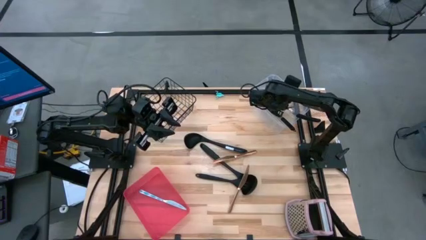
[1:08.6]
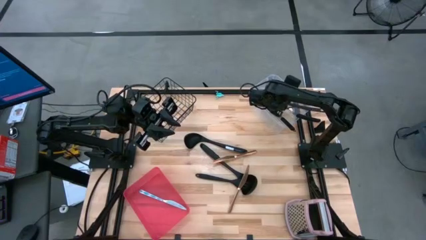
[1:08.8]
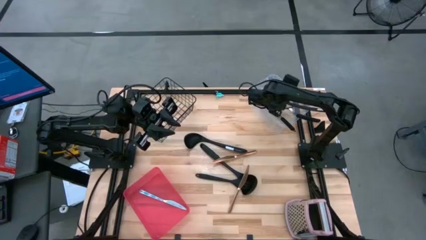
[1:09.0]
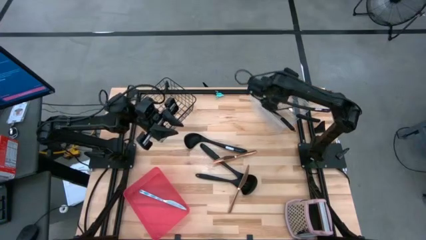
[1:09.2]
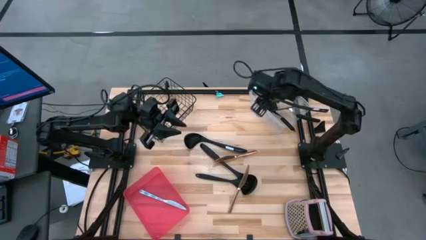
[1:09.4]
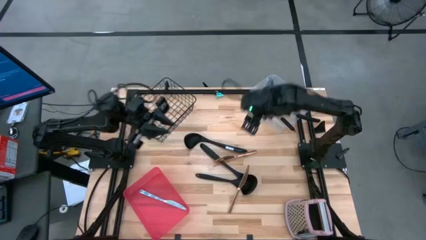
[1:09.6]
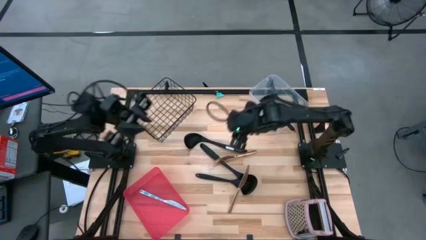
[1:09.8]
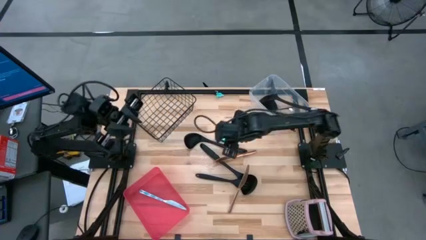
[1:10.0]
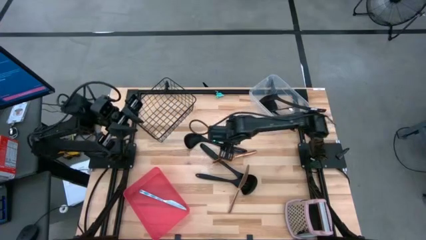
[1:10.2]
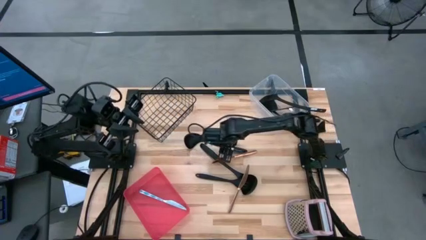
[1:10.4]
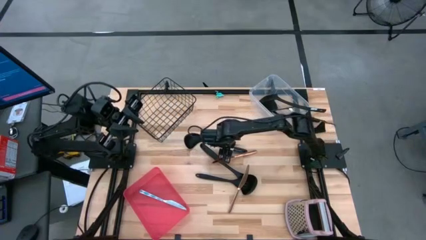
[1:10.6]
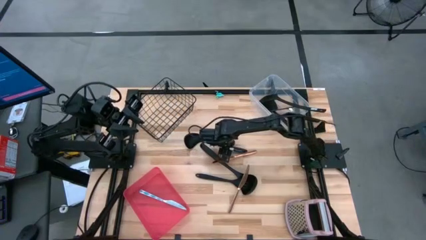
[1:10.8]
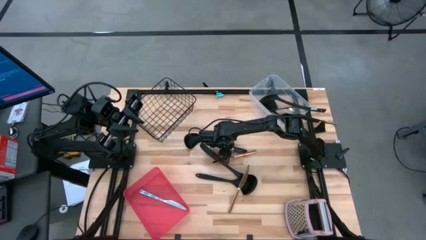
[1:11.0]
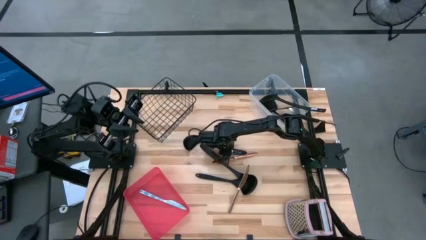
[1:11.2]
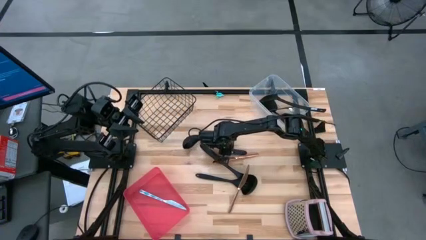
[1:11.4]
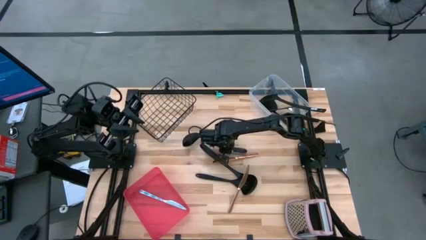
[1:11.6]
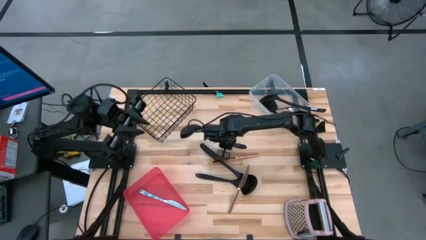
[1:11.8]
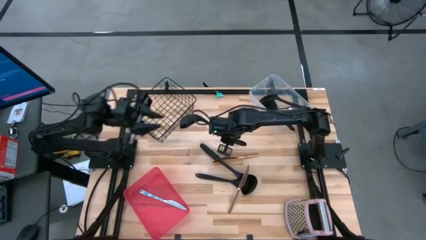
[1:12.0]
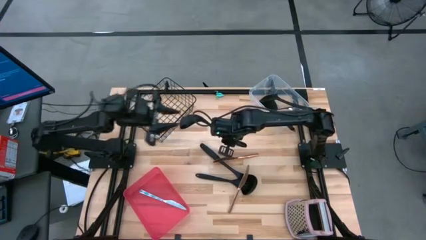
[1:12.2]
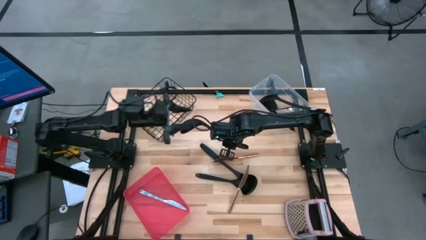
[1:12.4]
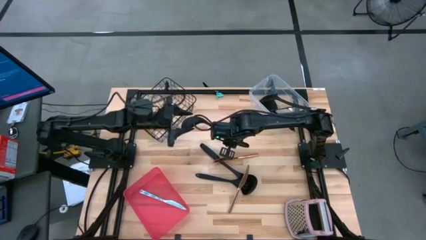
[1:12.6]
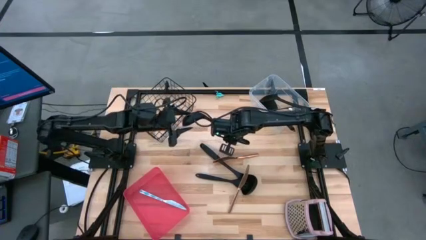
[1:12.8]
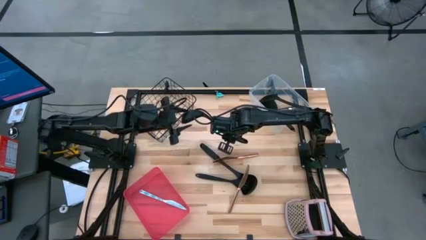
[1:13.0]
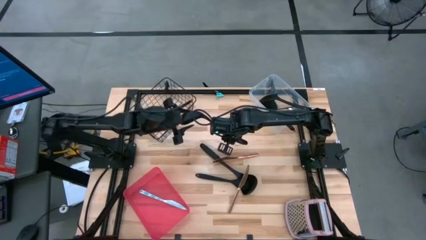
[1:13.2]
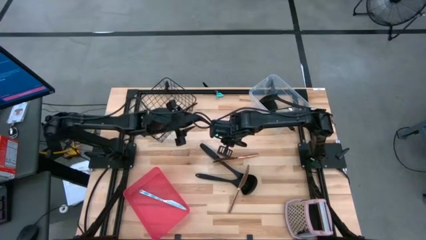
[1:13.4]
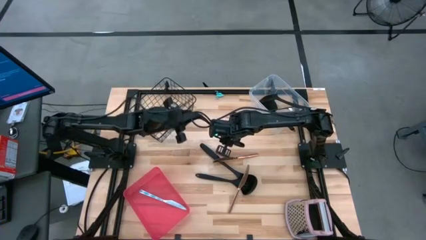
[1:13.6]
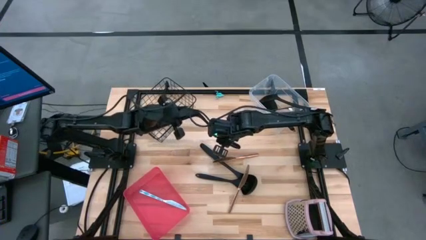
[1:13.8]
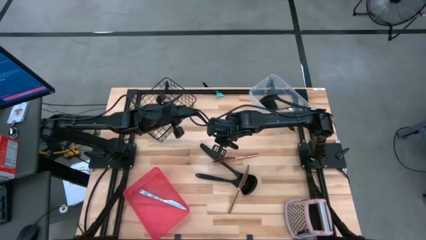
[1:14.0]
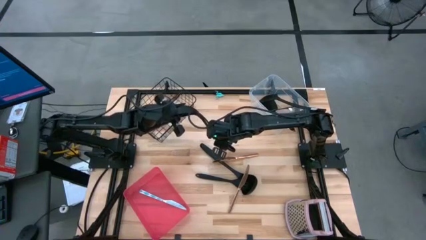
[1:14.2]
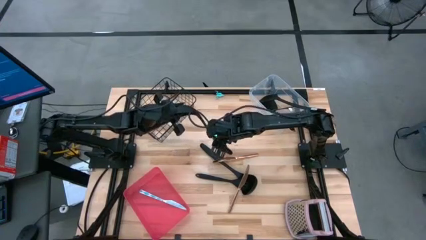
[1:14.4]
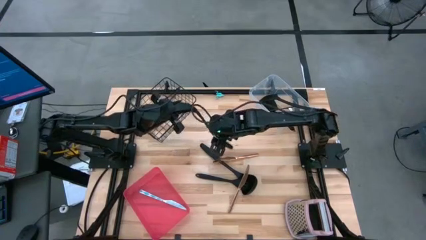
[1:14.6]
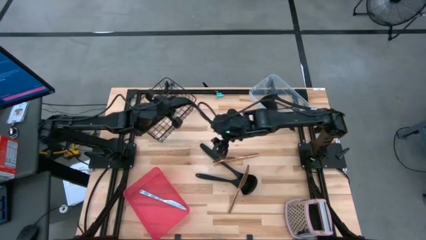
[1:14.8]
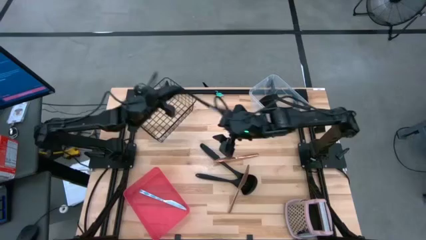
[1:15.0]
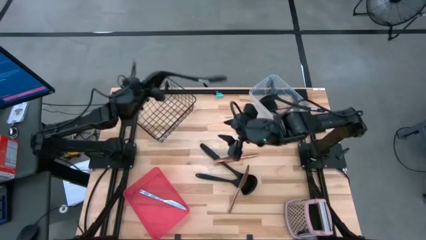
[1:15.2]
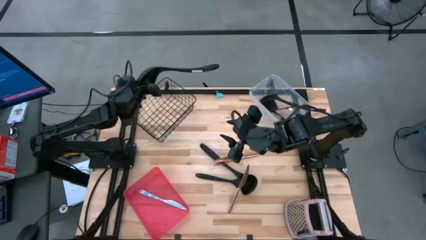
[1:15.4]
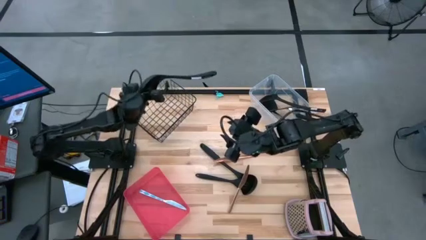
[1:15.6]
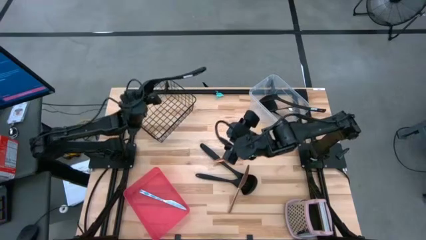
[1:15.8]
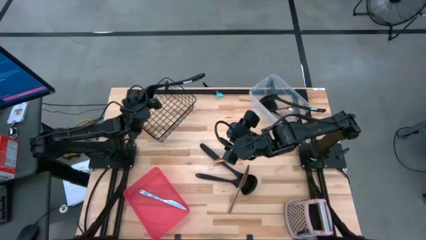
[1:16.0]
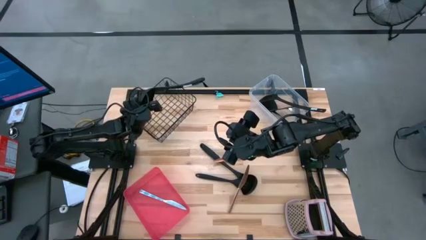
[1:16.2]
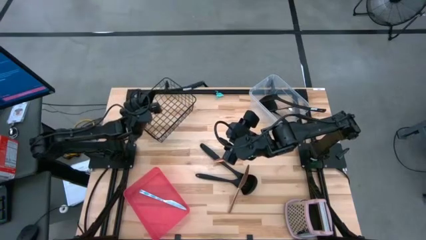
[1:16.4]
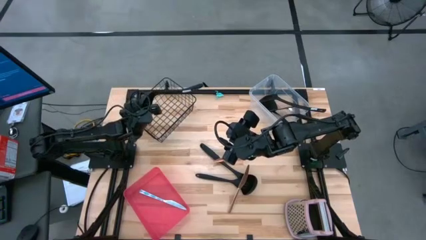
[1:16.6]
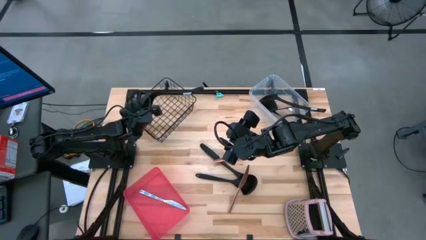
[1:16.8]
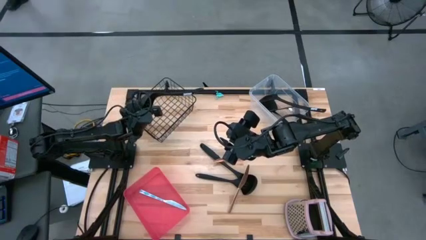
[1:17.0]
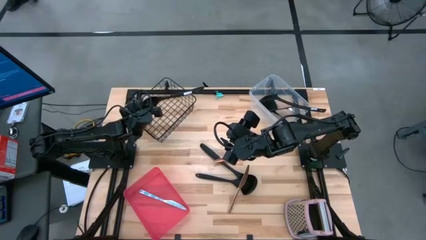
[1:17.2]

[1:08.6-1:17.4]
Task: Pick & Place Kitchen Items
Put the top black serving spoon into the wire basket

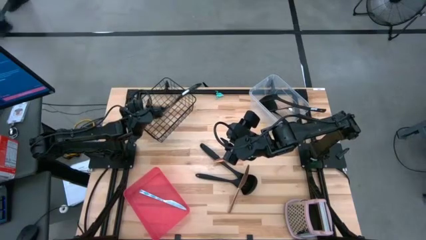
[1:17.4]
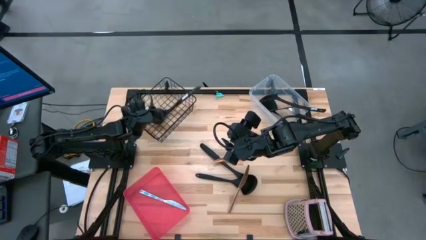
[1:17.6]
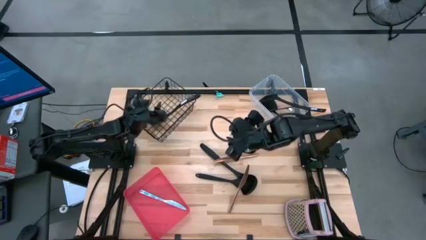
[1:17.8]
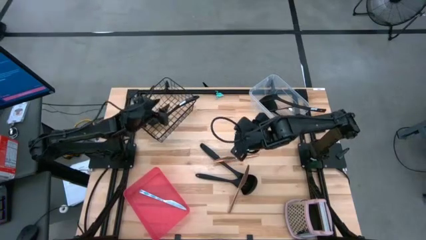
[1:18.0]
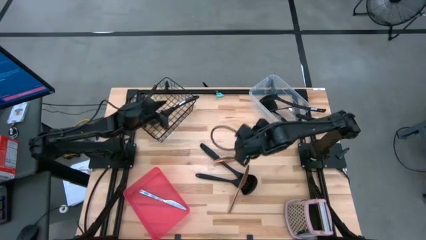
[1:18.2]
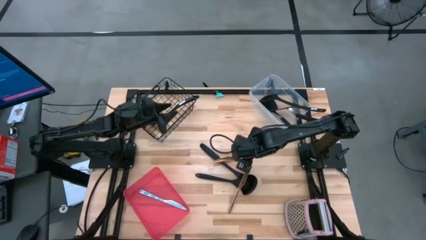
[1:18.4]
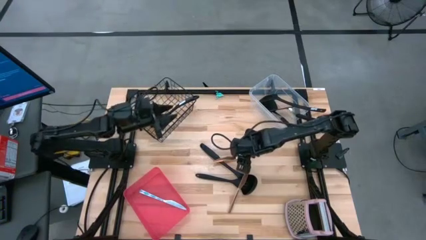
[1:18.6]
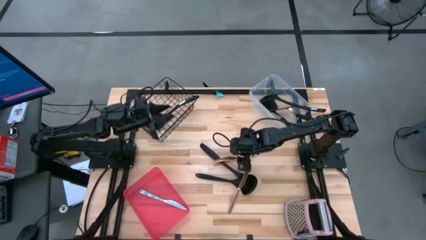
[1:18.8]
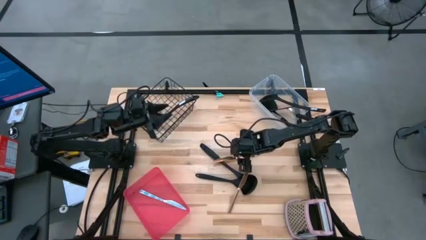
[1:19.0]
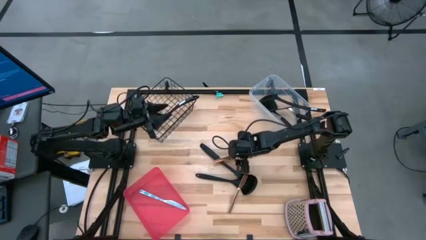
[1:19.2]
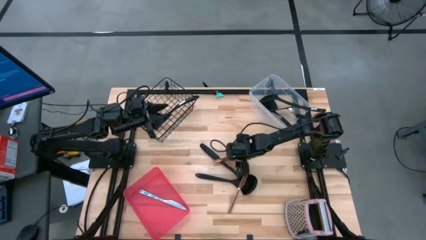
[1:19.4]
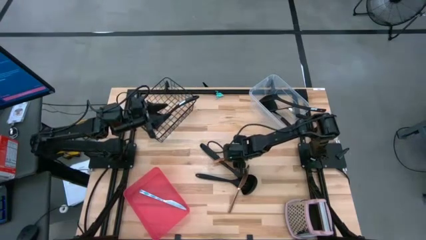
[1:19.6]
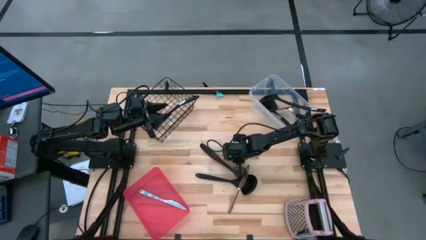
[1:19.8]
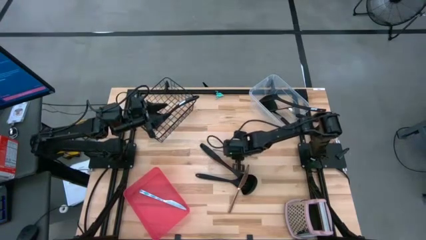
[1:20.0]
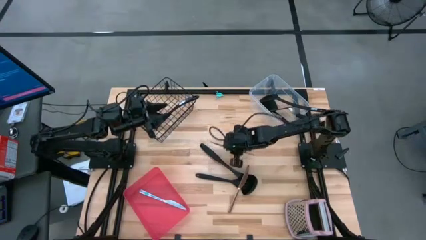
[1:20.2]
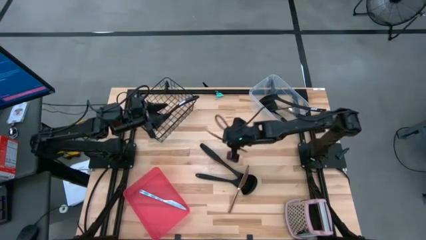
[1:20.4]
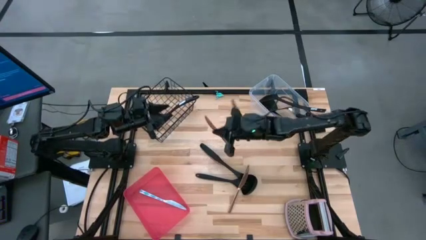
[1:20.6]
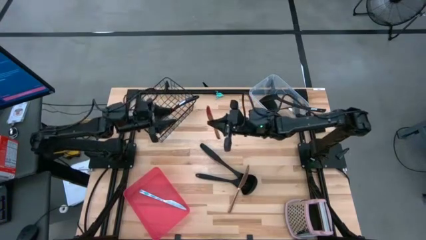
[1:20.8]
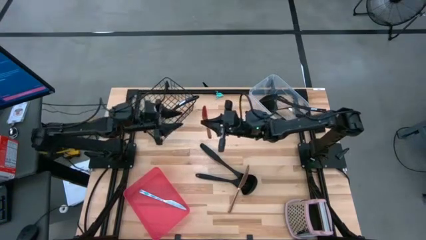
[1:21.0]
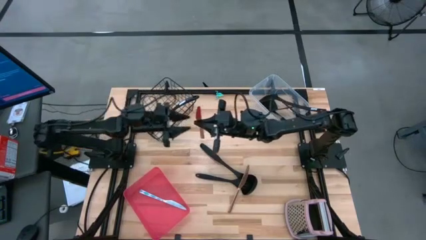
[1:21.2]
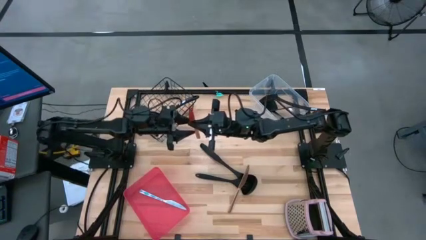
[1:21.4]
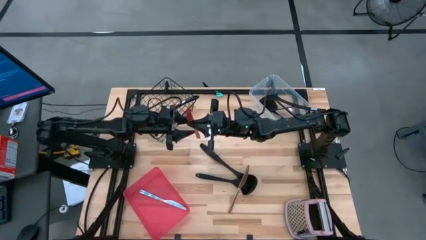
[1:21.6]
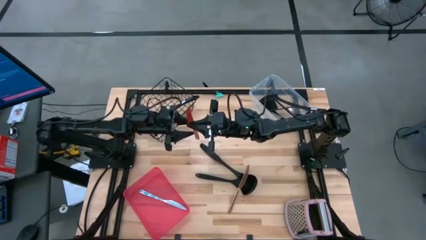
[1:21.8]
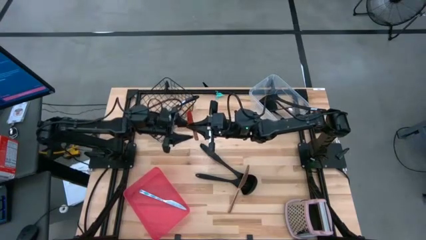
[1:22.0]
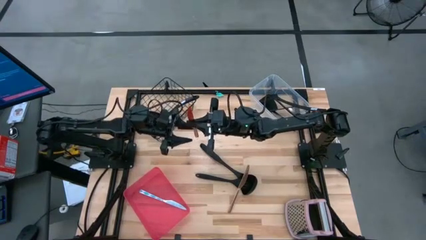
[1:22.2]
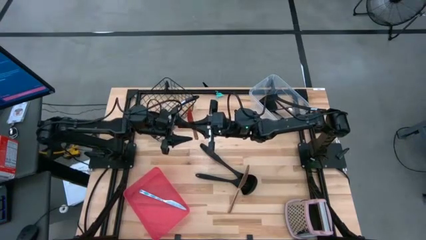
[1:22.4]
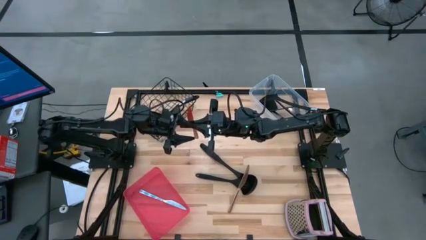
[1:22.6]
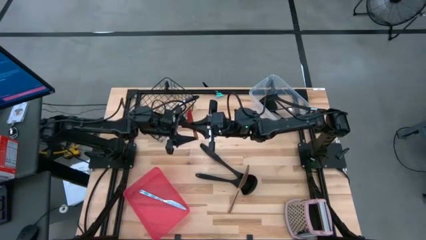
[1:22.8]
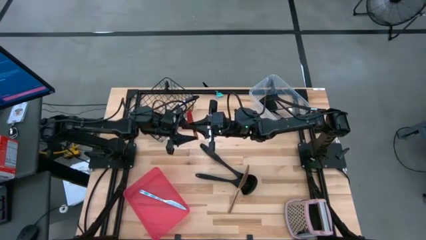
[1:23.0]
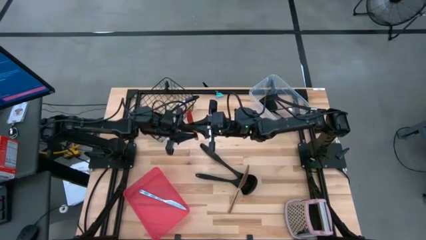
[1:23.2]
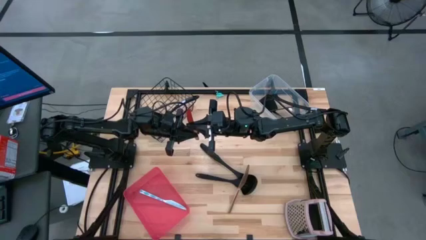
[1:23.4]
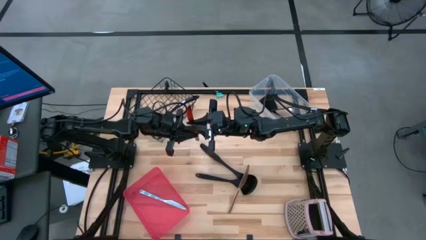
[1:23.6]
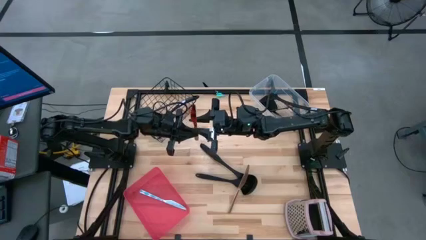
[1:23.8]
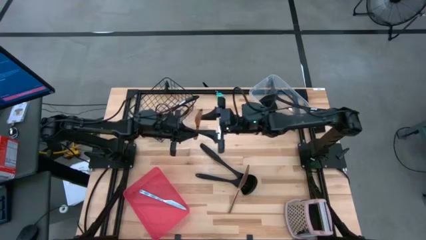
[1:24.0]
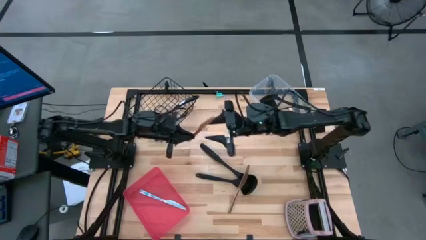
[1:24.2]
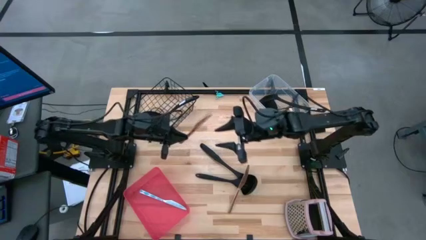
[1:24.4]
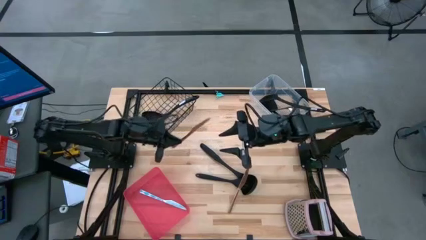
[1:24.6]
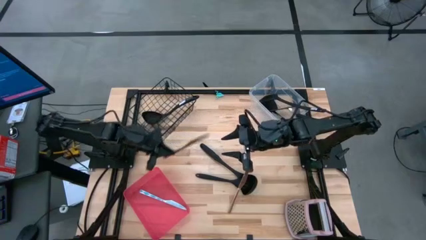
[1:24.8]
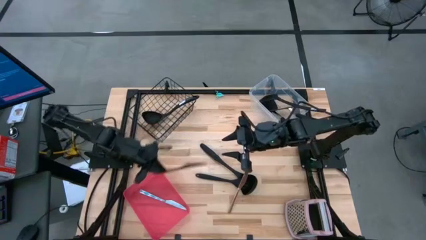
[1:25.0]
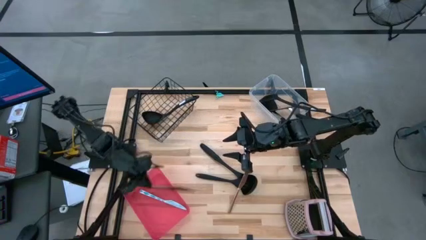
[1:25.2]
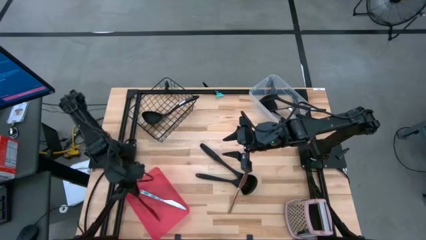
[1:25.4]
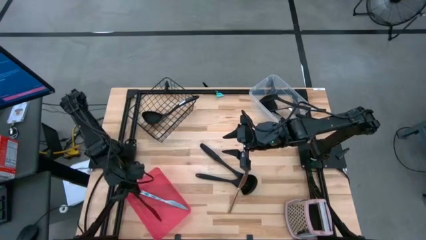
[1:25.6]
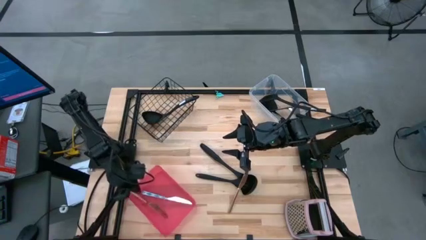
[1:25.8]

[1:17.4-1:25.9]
Put the top gold table knife into the red bin

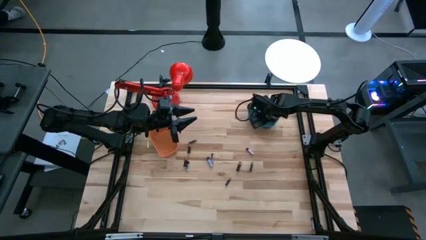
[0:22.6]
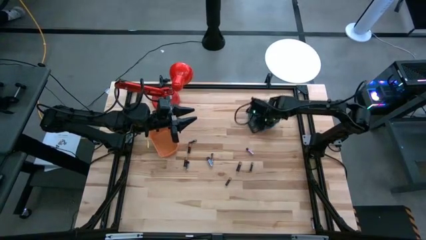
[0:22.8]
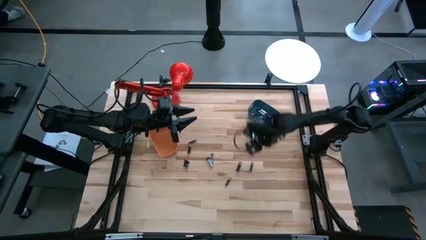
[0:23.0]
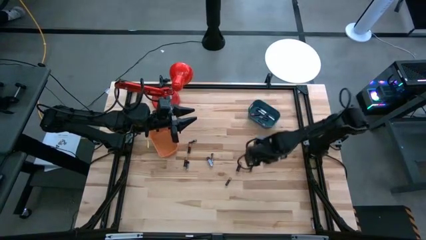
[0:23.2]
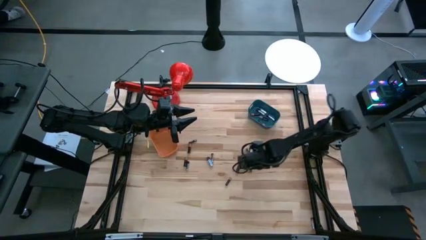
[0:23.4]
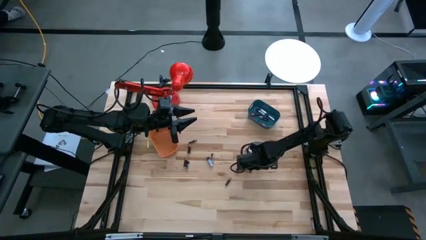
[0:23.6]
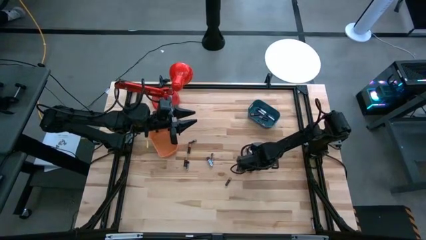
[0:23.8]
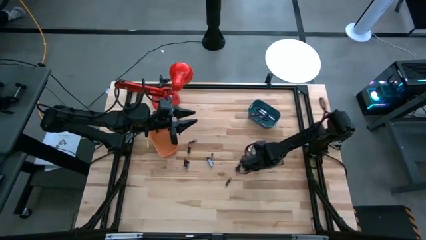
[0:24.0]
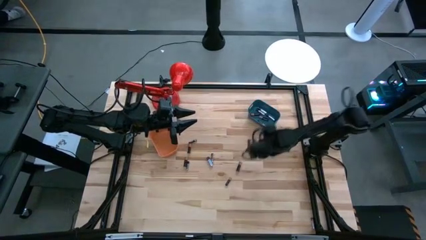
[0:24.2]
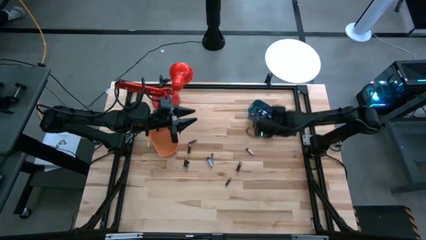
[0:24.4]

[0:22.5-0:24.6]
Task: Sort batteries
Put the black battery into the blue bin
